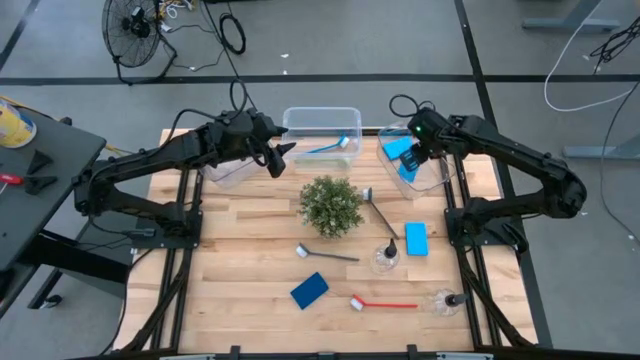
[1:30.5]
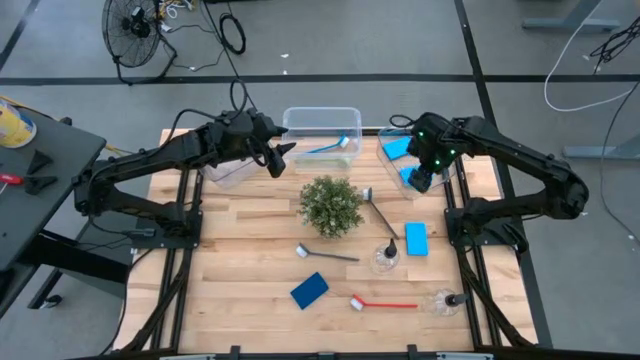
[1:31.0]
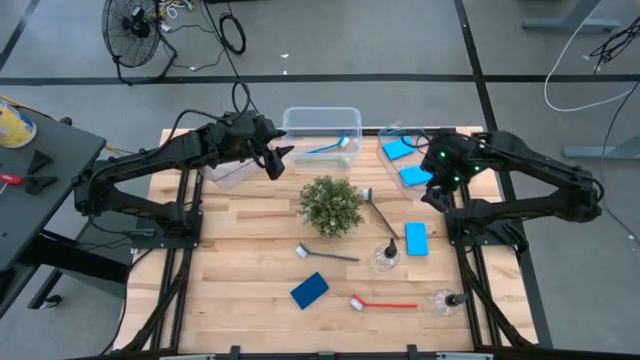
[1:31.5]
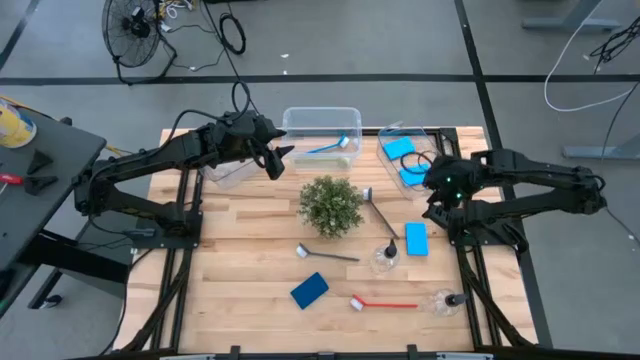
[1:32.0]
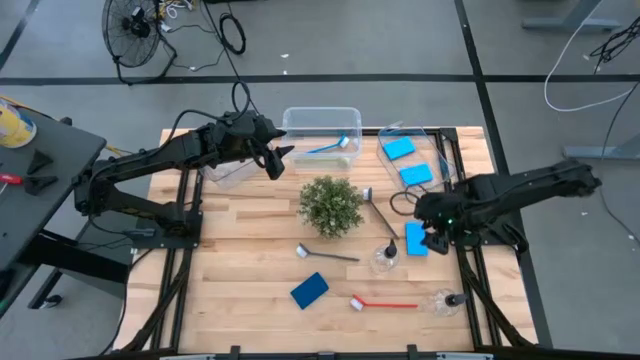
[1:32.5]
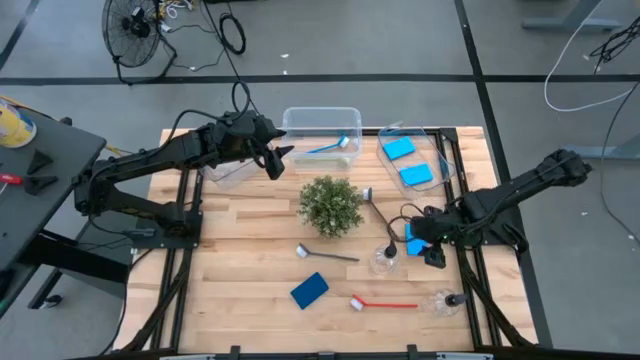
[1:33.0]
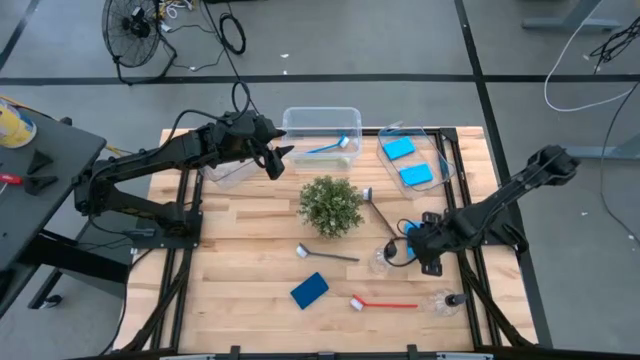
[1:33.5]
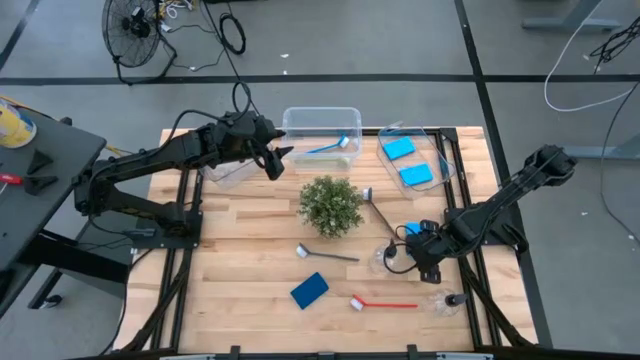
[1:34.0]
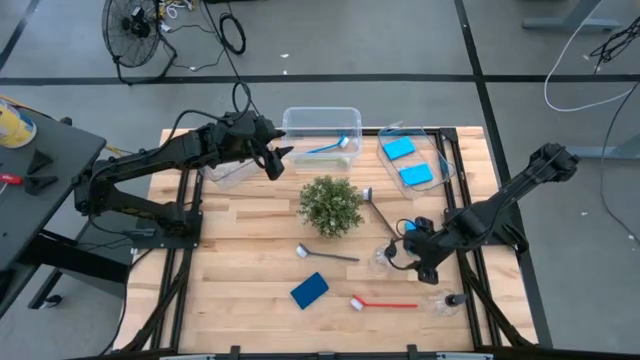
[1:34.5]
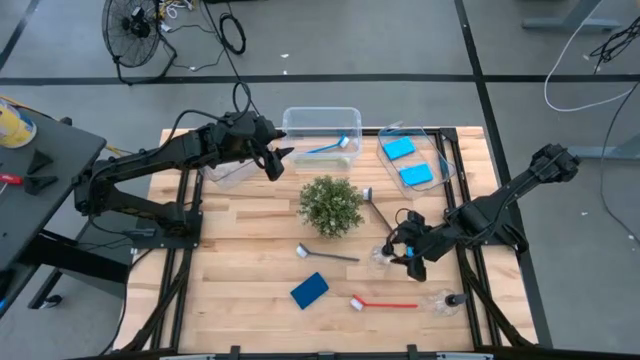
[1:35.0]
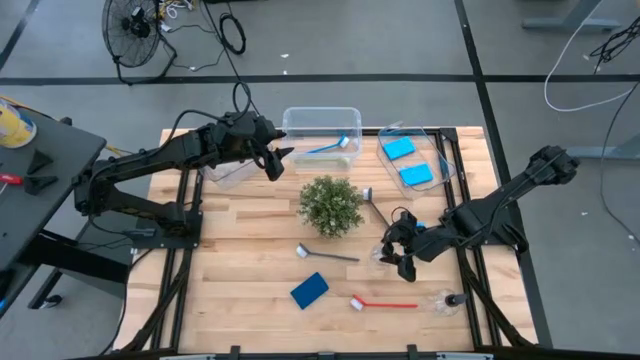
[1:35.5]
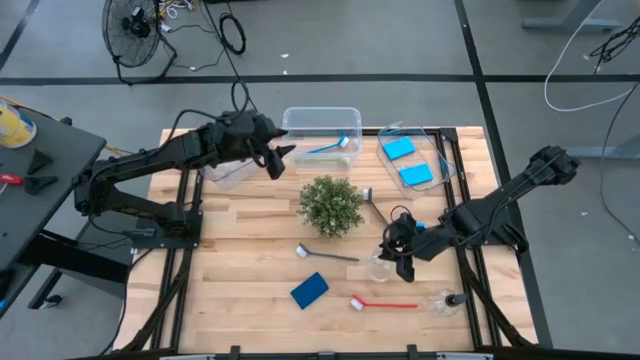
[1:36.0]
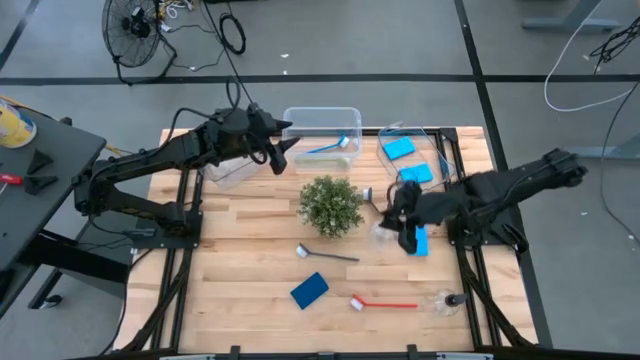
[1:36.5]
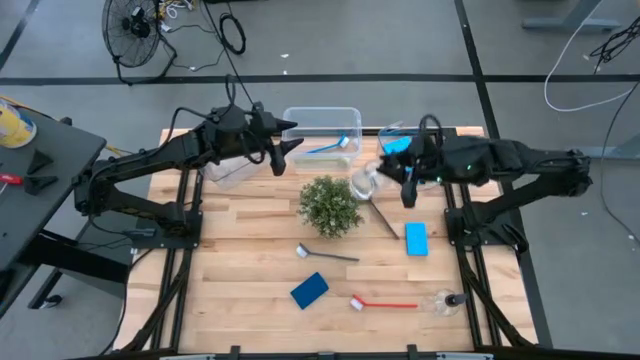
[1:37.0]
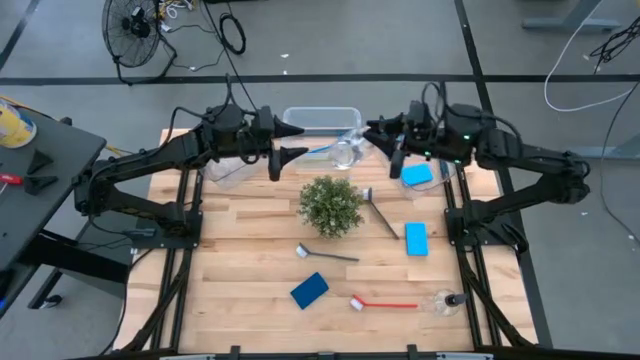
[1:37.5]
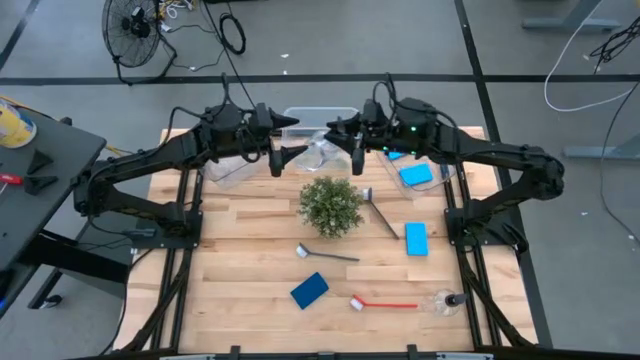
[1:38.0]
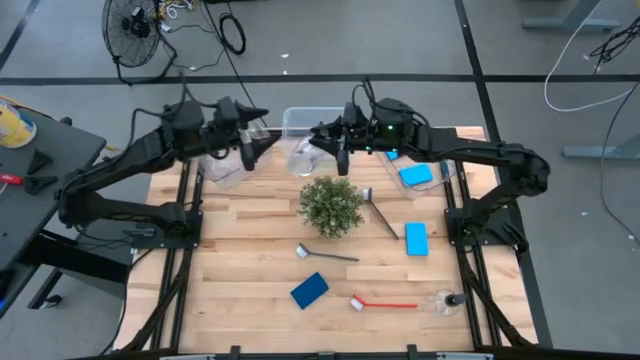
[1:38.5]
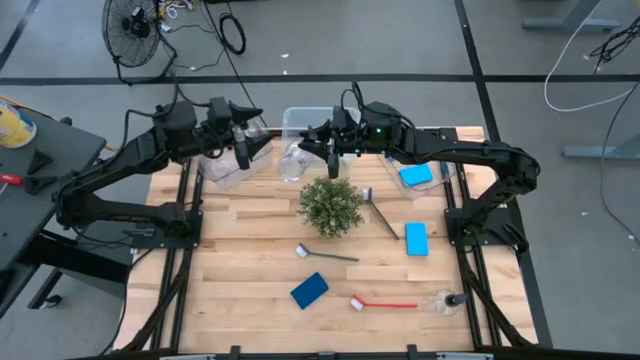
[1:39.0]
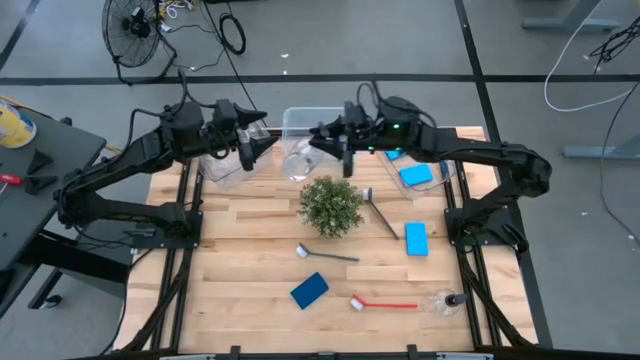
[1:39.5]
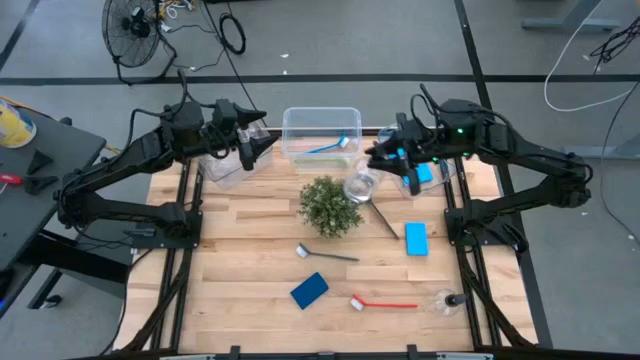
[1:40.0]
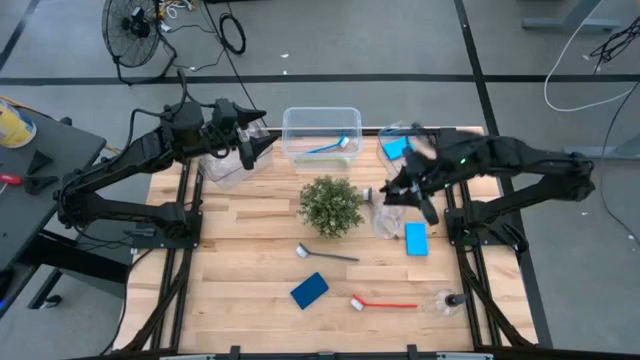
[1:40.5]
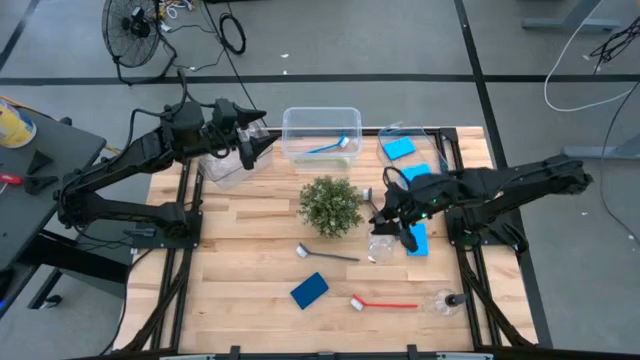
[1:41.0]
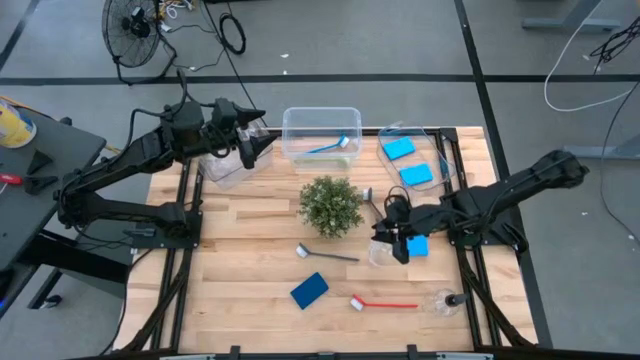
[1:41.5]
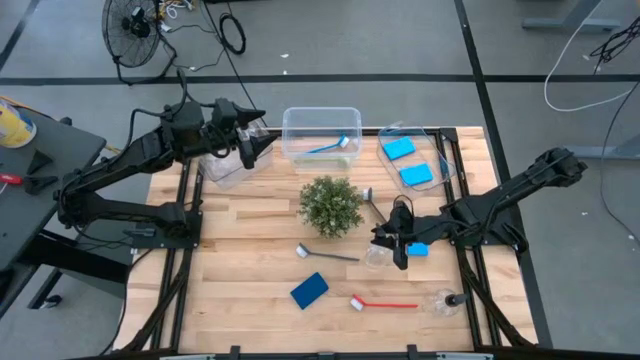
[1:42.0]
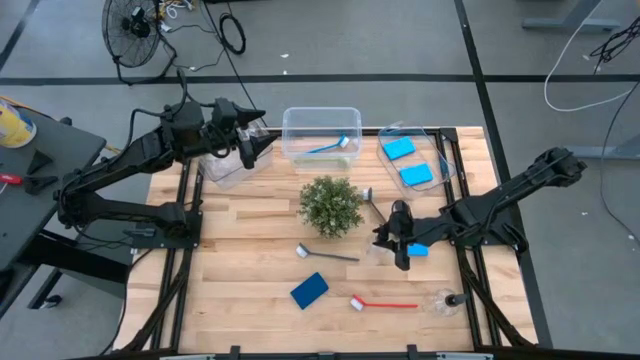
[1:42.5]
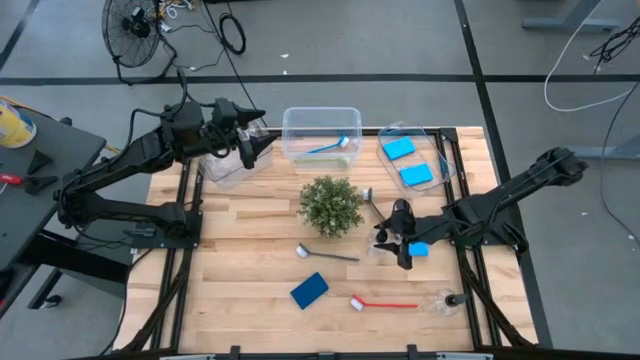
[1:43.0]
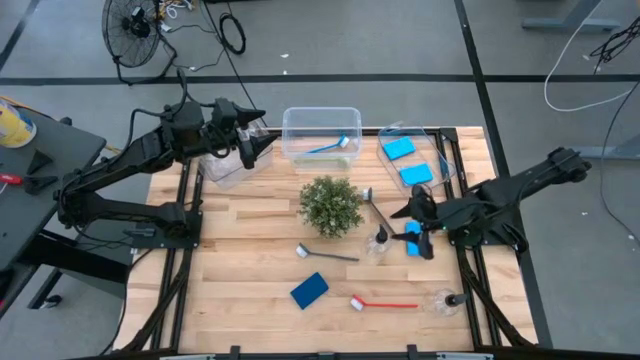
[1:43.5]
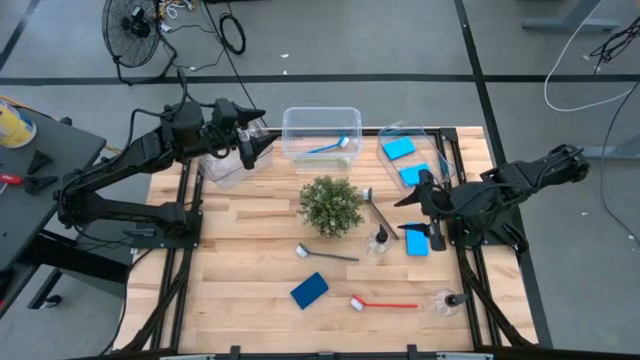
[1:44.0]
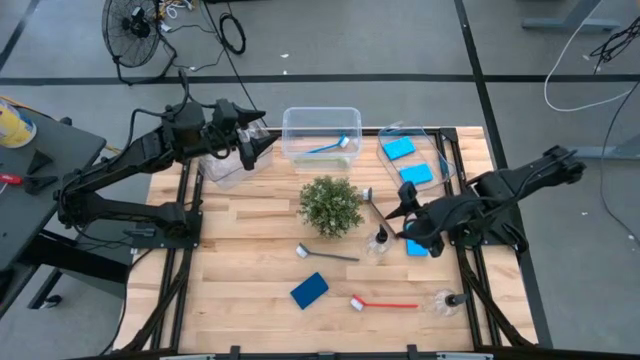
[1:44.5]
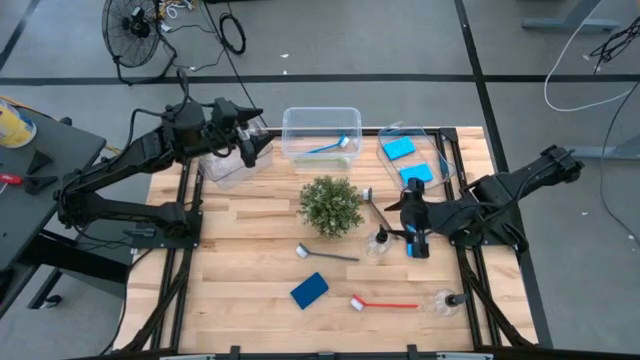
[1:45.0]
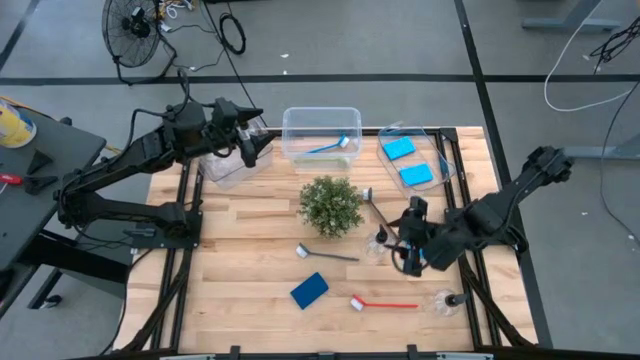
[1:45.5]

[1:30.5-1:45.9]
Task: Pick & Place Kitchen Sink Supplies
Put the transparent soap dispenser into the left transparent bin
